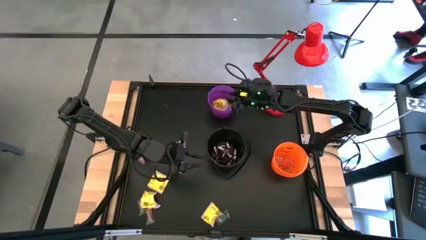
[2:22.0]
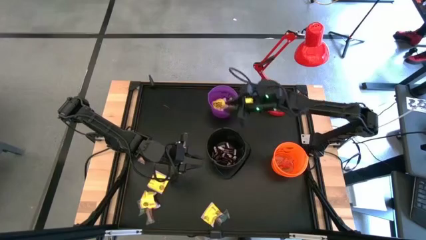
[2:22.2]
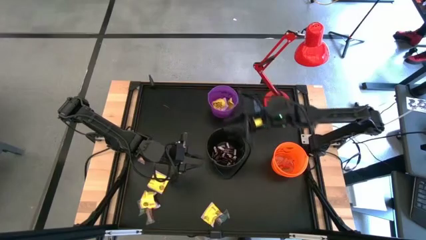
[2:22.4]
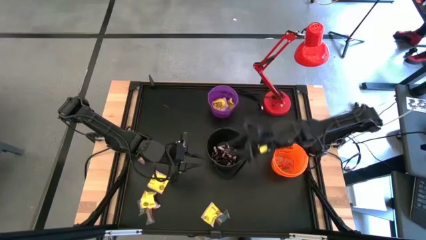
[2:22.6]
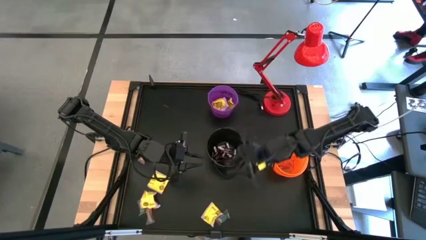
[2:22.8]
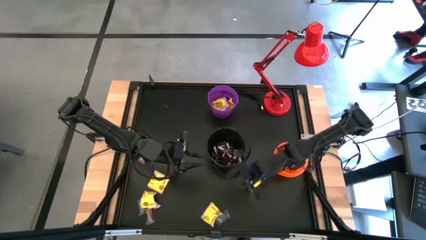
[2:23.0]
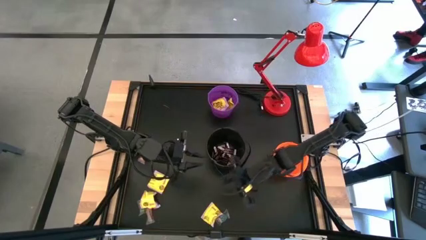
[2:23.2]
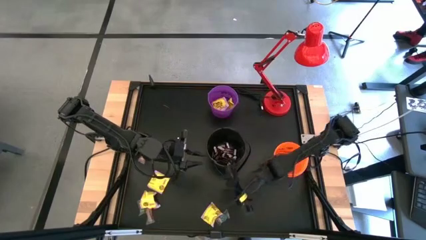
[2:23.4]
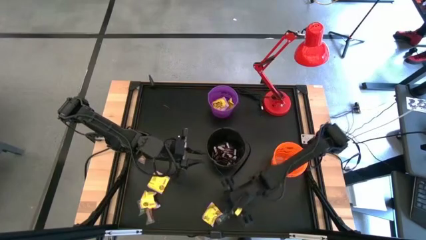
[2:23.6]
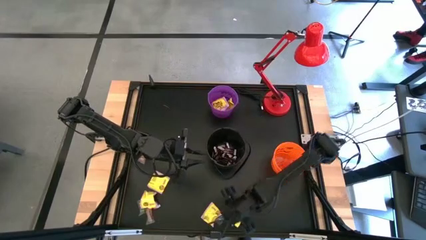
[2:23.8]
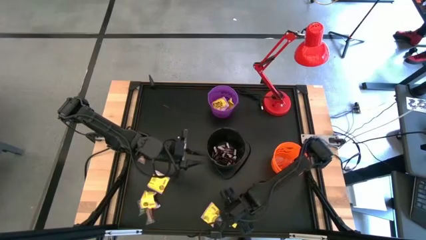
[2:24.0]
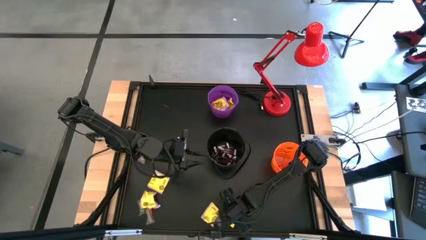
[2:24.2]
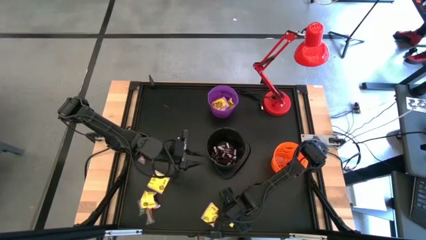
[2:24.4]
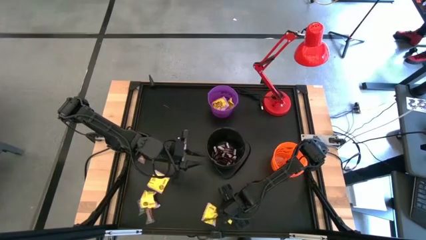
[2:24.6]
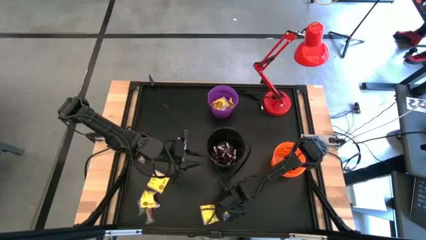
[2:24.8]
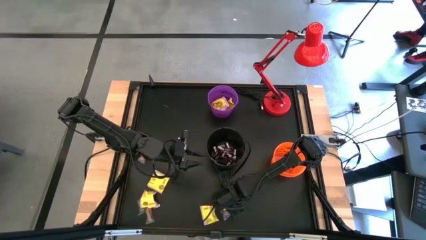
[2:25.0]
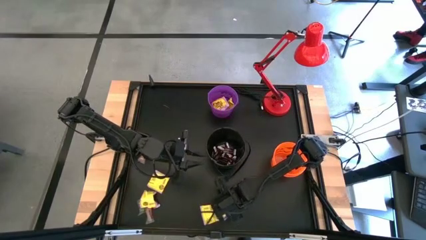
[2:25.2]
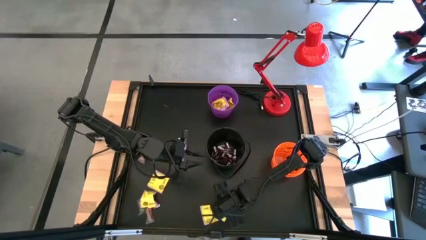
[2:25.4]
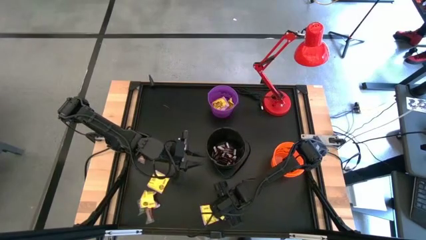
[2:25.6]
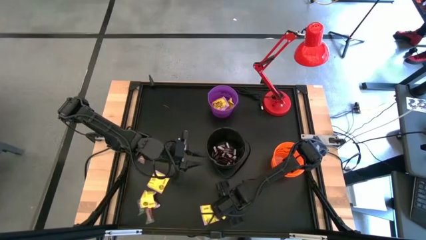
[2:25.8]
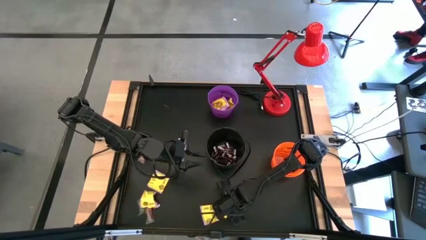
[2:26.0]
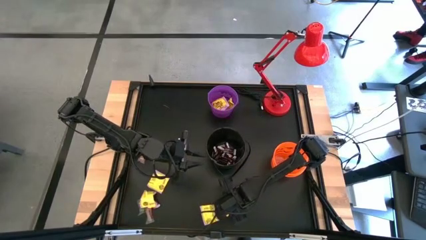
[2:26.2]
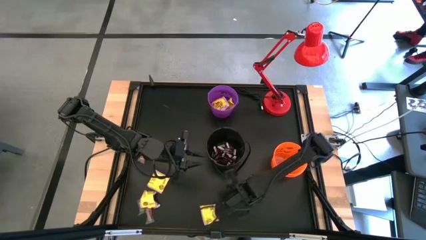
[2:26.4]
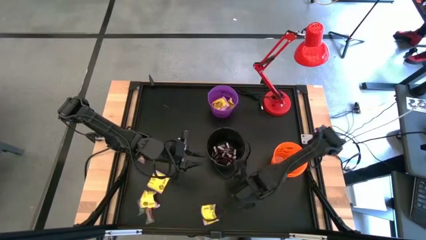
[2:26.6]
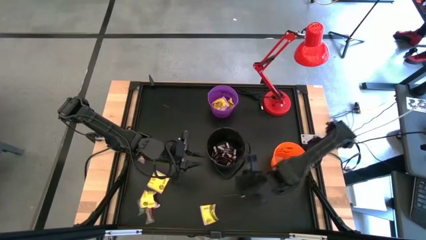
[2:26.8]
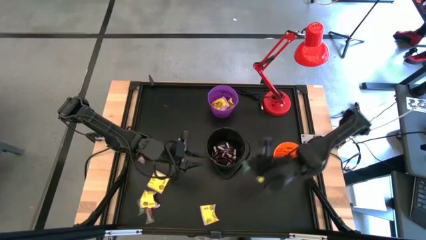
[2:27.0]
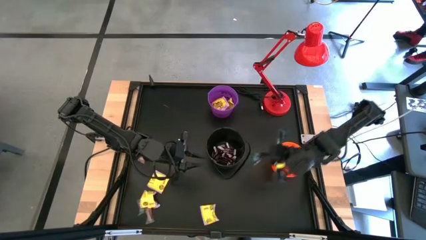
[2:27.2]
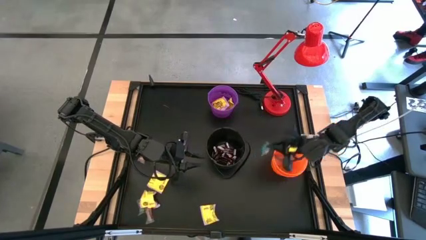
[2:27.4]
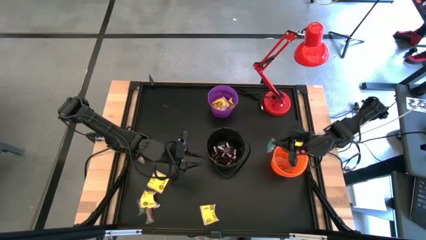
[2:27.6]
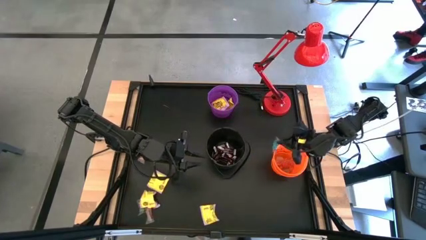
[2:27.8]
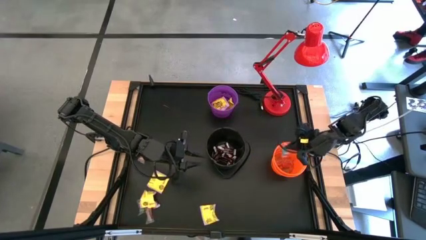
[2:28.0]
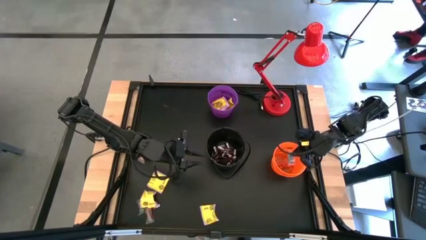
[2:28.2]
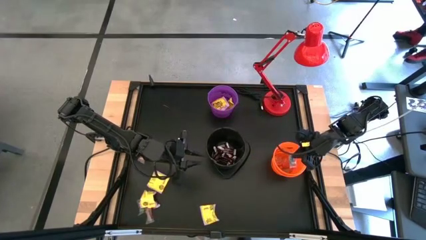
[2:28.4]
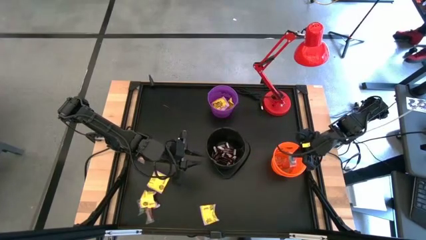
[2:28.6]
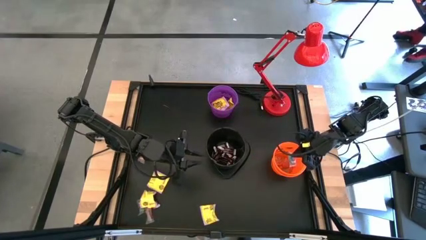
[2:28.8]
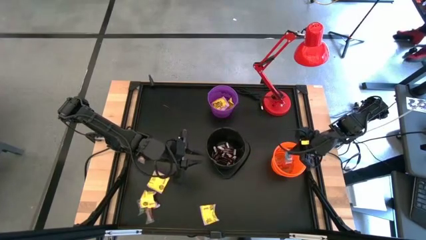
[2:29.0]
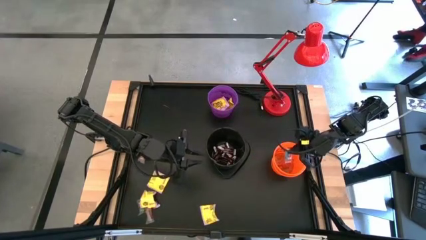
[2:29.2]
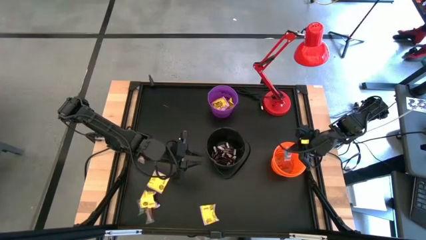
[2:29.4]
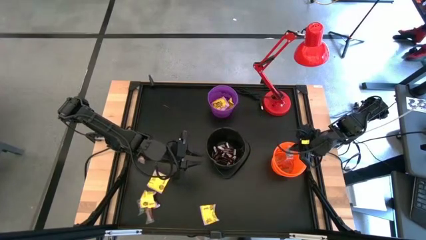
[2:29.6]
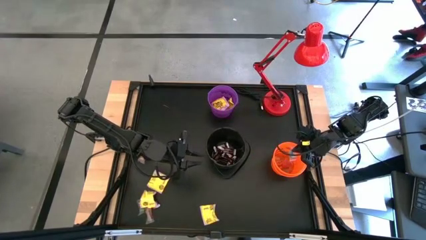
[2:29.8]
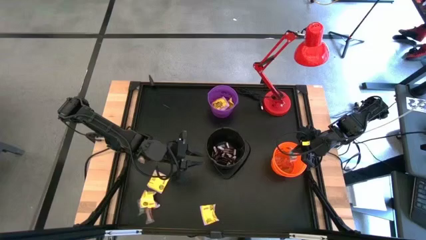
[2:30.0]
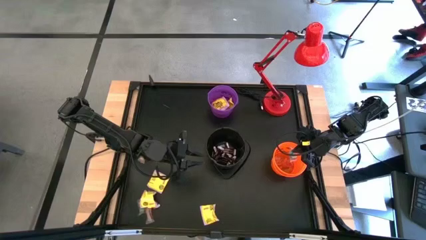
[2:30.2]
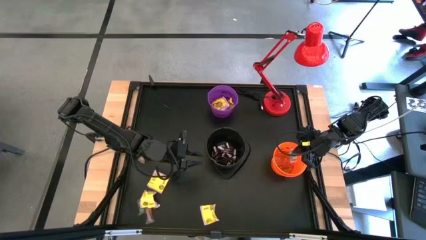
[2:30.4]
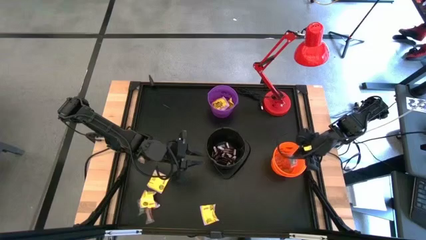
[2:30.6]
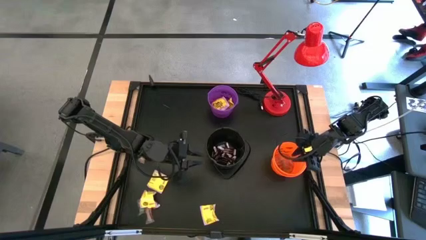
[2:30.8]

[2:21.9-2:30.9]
Task: Sort candy
Put the blue gummy into the orange bucket

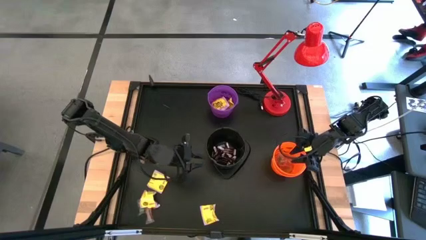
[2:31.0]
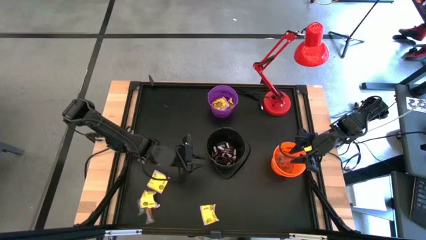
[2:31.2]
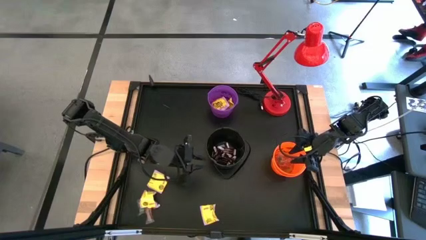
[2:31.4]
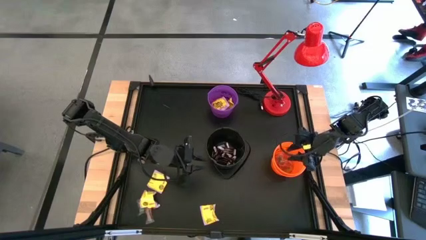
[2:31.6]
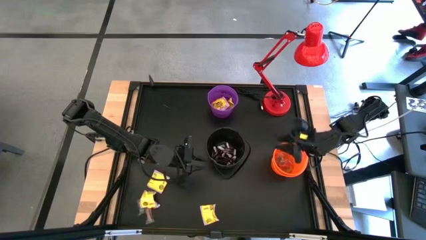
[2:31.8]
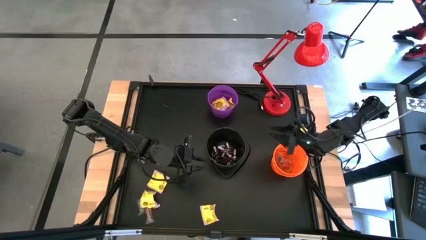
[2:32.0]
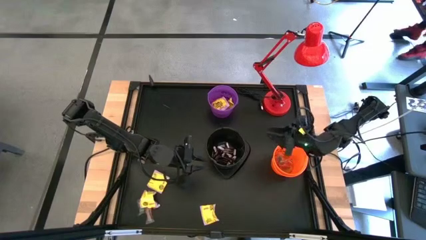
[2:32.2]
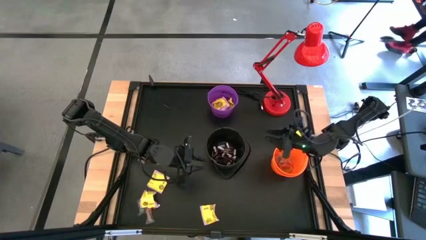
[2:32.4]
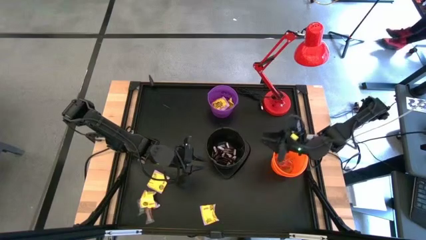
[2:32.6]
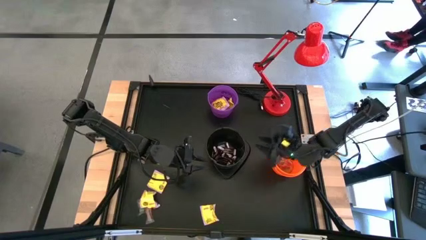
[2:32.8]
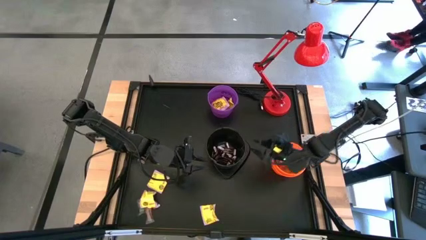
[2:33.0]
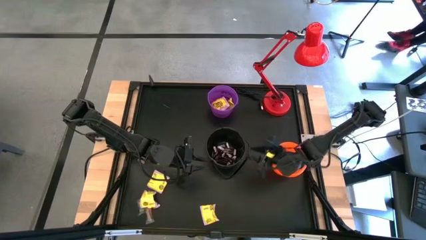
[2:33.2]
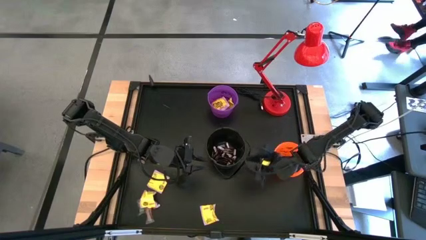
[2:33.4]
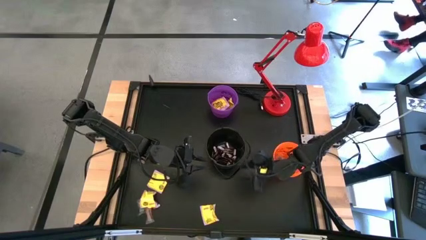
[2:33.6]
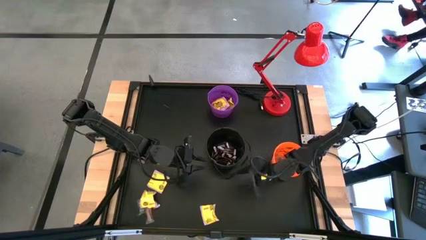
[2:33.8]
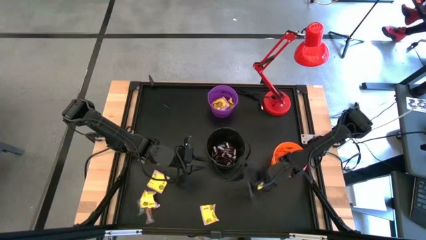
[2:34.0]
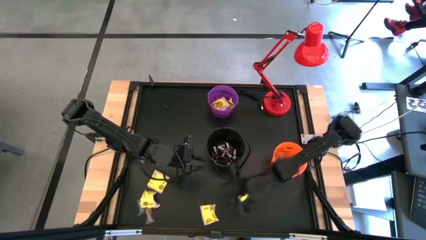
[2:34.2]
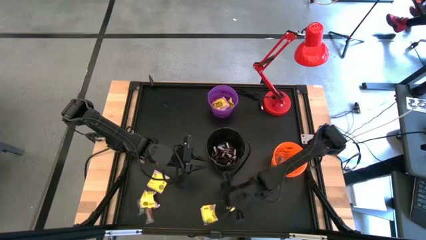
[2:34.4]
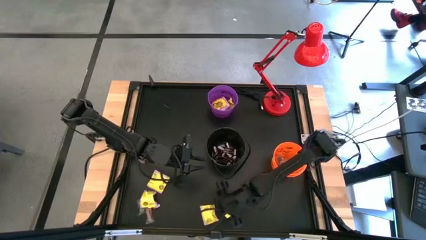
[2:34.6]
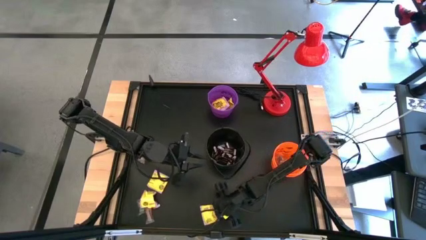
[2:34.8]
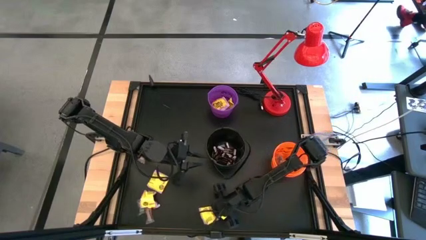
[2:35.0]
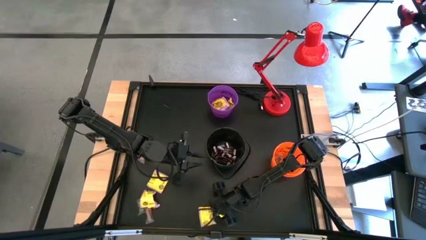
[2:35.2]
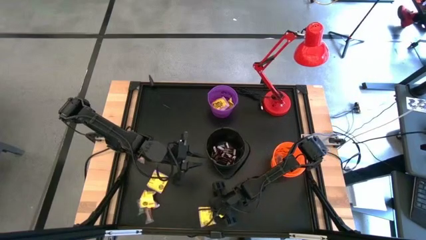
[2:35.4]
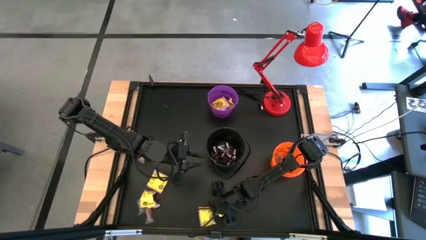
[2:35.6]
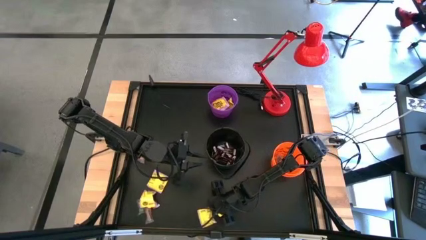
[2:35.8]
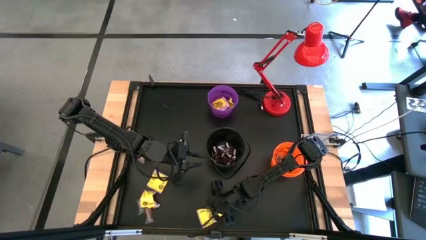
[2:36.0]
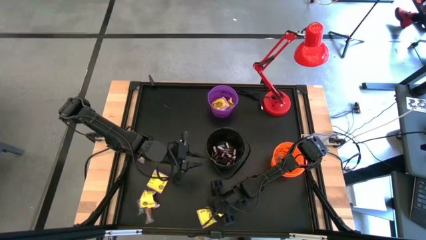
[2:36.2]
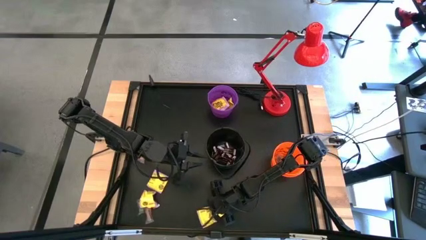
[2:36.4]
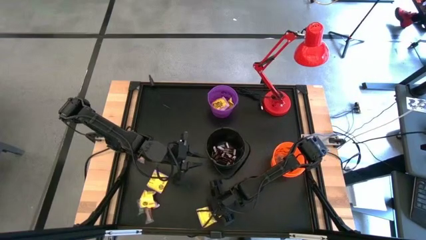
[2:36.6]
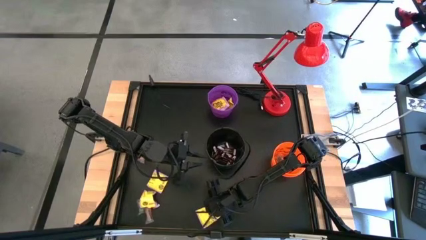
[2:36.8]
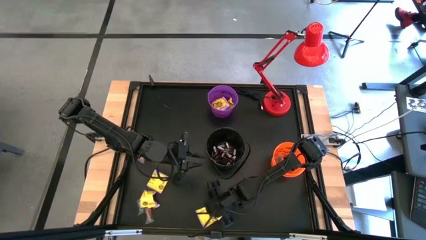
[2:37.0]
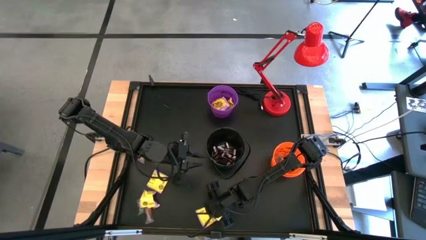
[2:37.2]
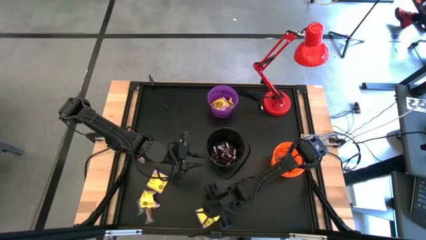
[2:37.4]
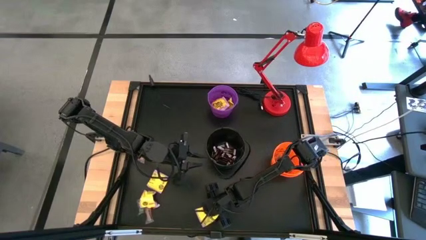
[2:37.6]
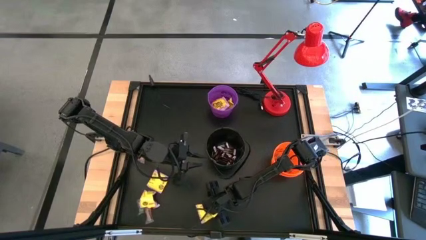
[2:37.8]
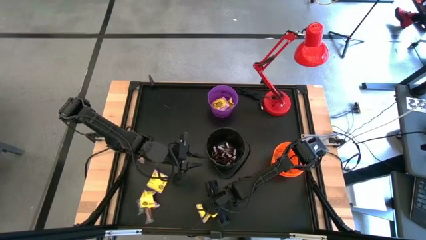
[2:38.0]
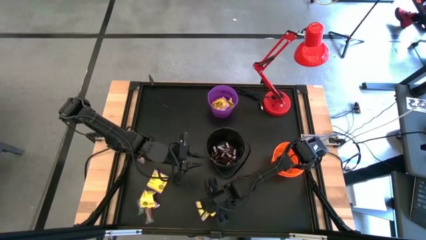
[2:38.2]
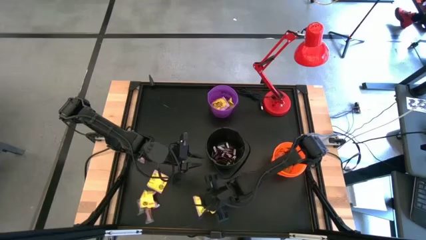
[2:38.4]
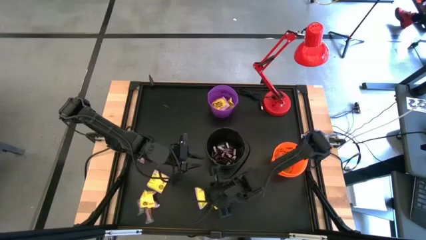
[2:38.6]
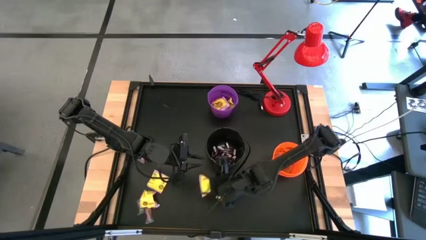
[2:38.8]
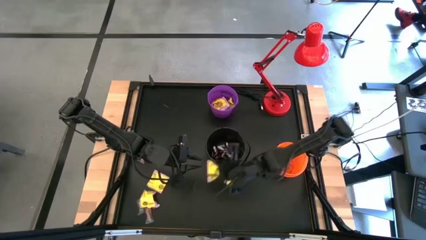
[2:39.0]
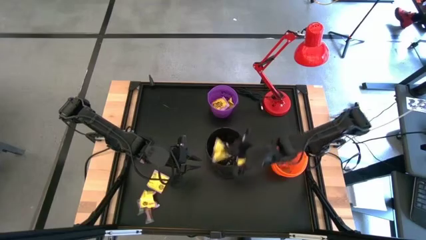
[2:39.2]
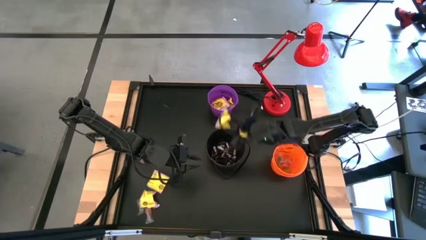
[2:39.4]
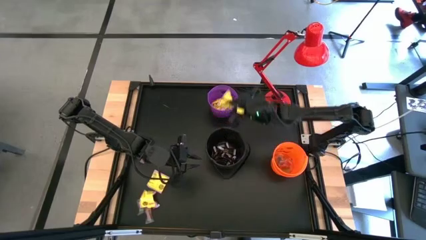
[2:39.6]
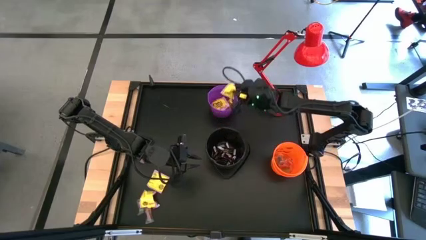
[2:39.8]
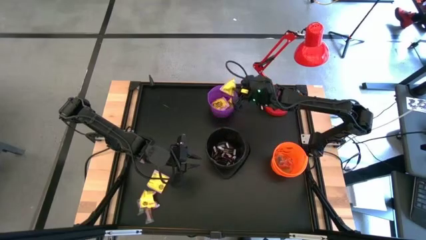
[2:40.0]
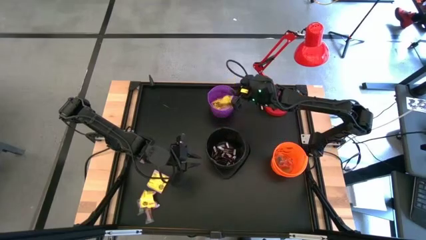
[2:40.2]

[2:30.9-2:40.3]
Put the yellow candy into the purple bucket
